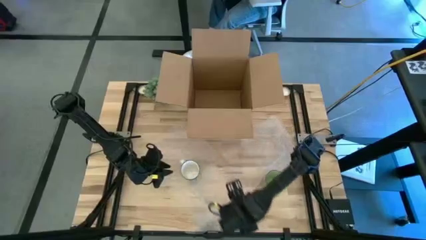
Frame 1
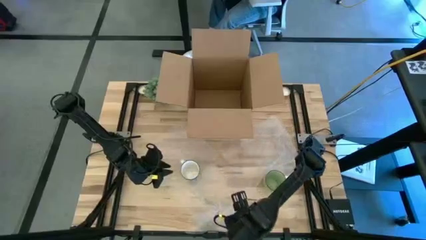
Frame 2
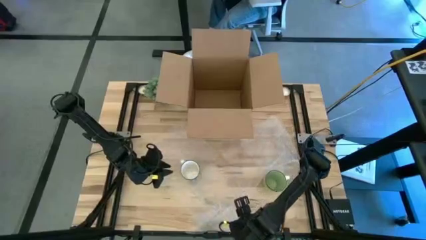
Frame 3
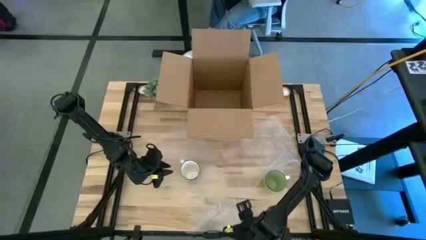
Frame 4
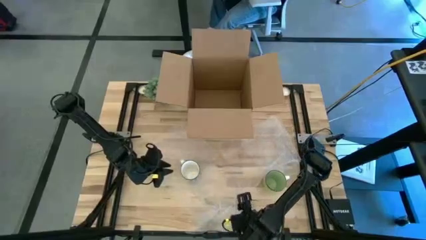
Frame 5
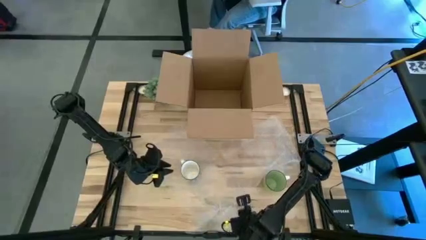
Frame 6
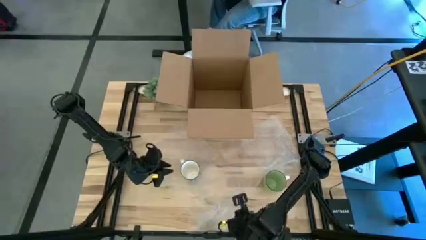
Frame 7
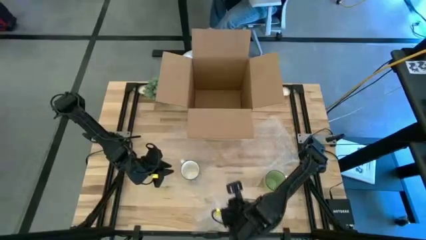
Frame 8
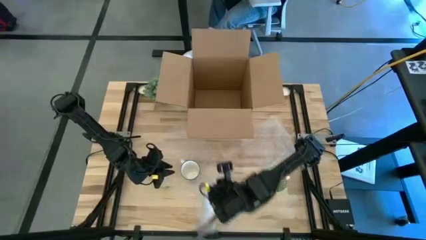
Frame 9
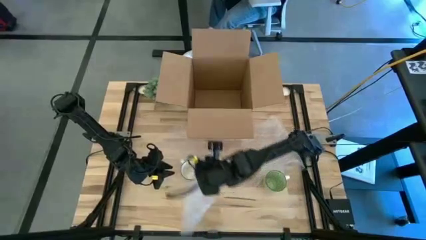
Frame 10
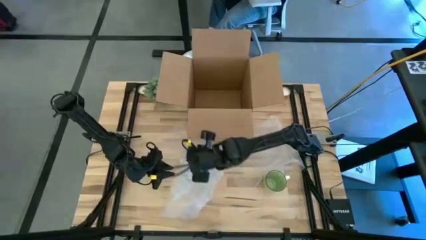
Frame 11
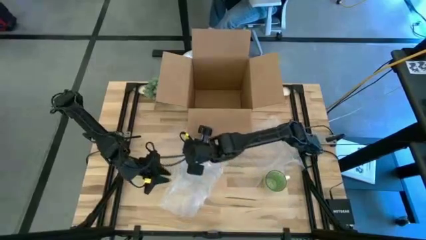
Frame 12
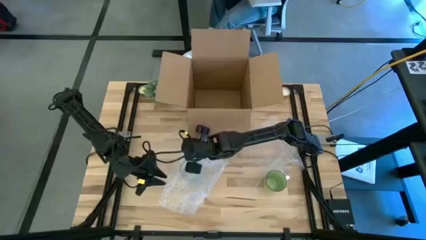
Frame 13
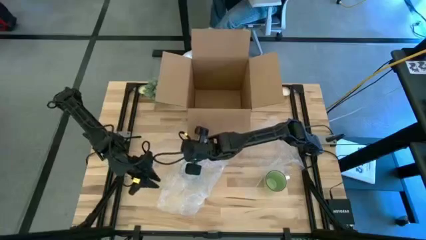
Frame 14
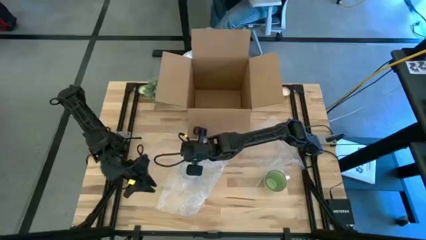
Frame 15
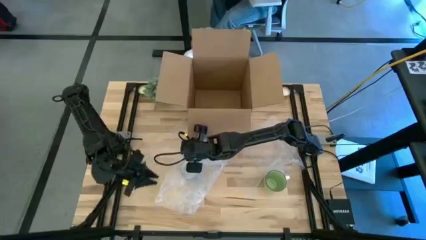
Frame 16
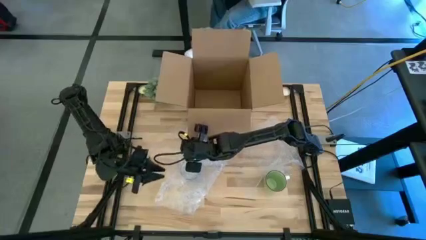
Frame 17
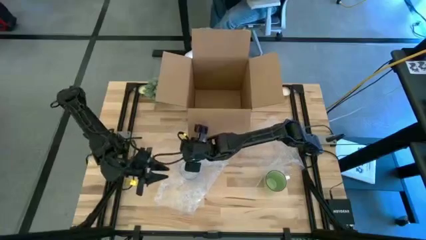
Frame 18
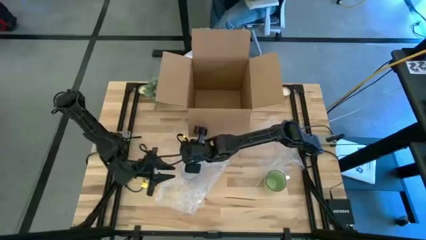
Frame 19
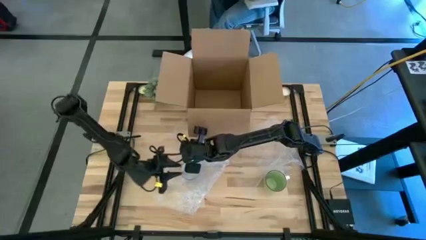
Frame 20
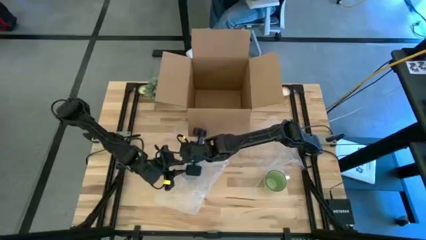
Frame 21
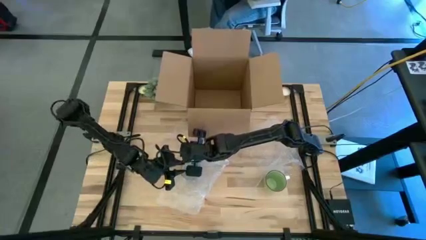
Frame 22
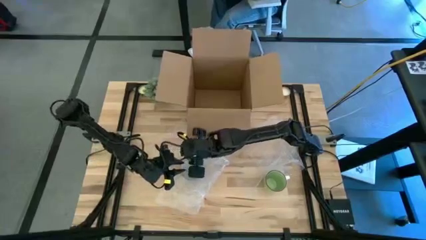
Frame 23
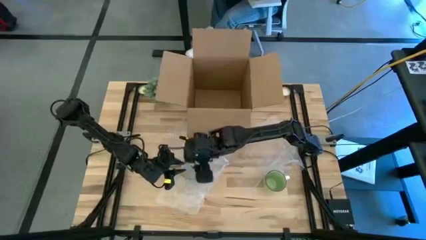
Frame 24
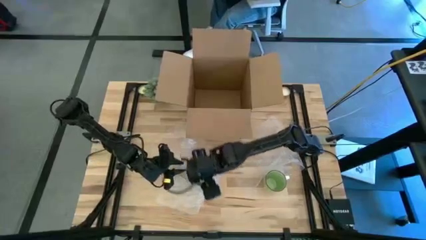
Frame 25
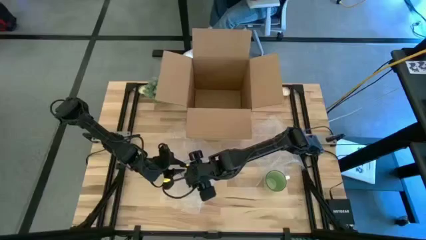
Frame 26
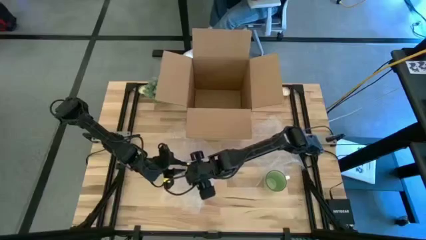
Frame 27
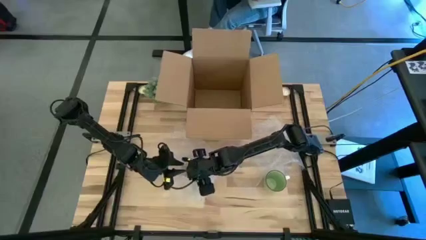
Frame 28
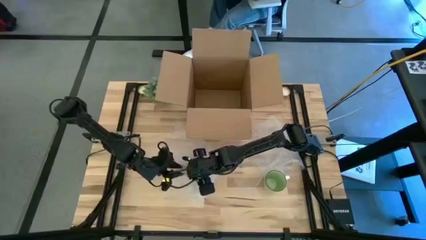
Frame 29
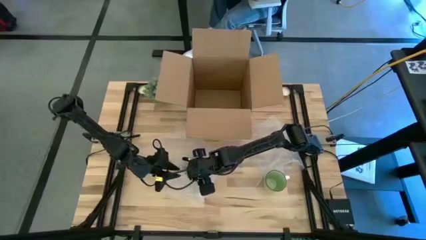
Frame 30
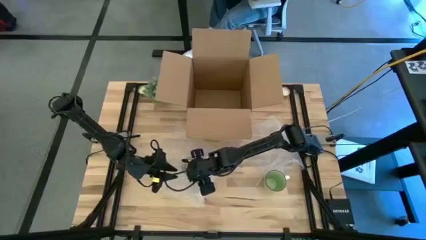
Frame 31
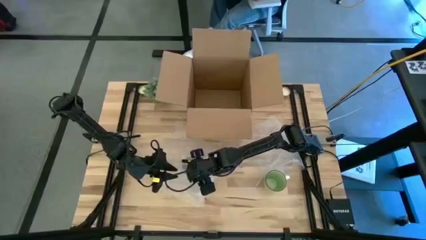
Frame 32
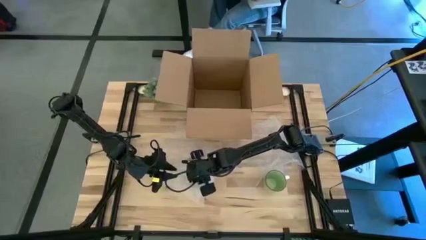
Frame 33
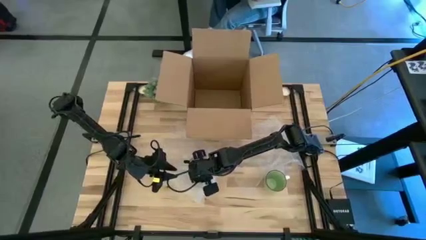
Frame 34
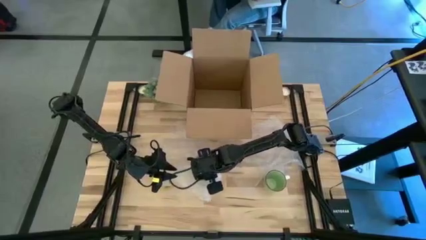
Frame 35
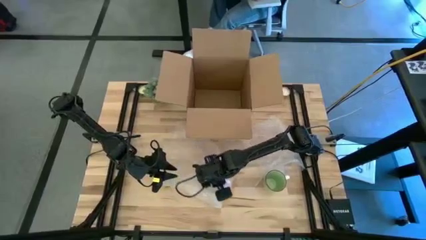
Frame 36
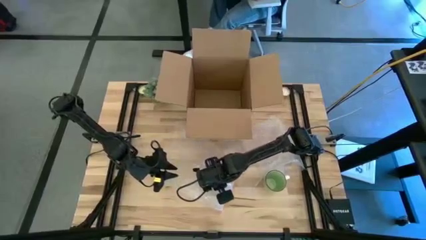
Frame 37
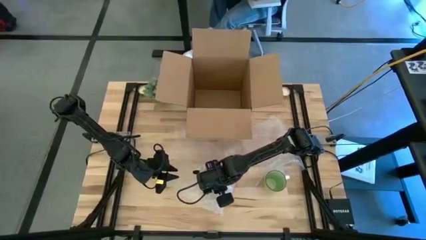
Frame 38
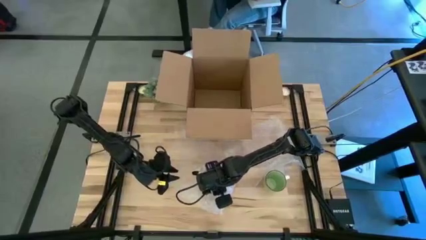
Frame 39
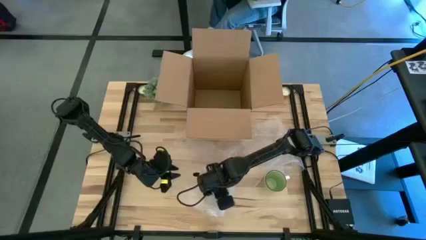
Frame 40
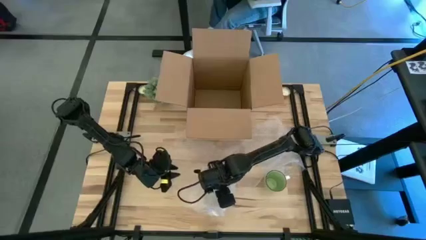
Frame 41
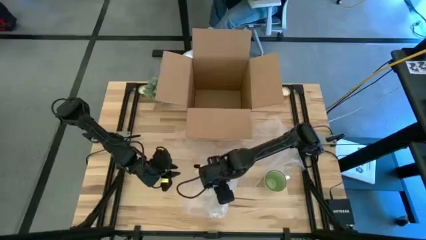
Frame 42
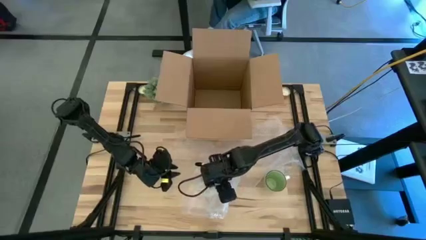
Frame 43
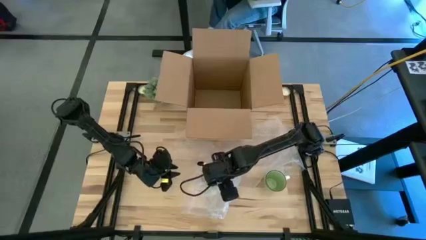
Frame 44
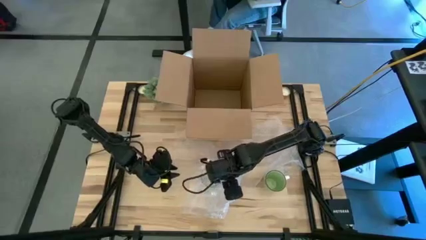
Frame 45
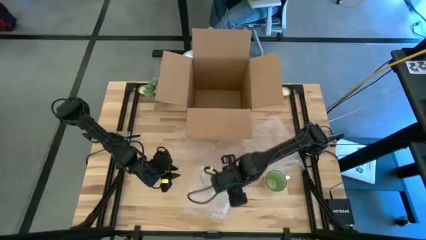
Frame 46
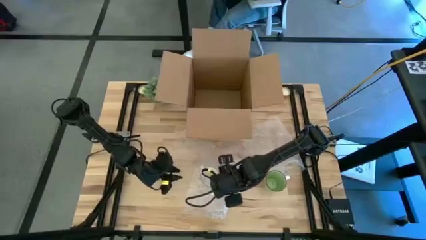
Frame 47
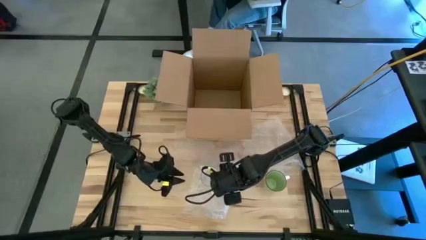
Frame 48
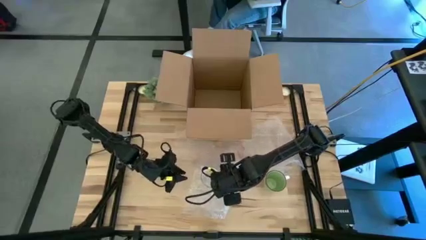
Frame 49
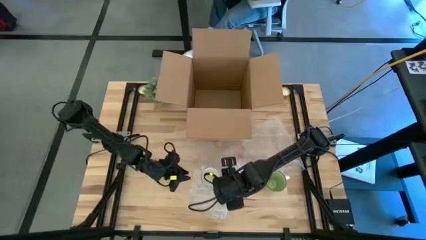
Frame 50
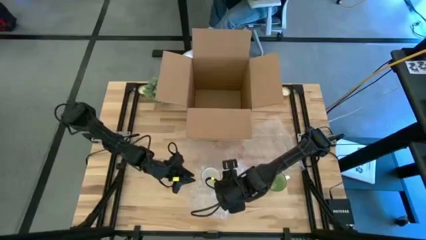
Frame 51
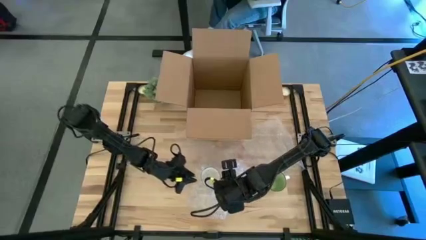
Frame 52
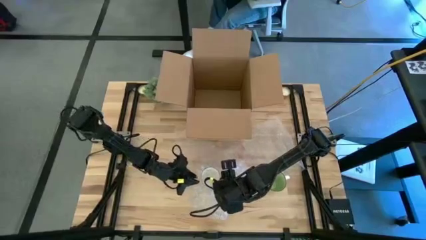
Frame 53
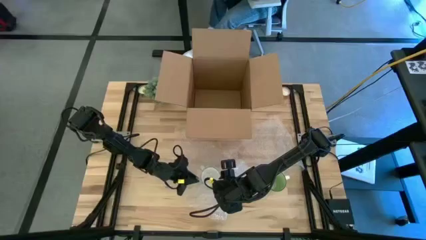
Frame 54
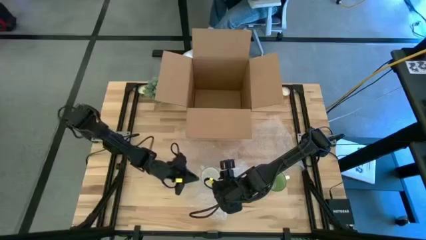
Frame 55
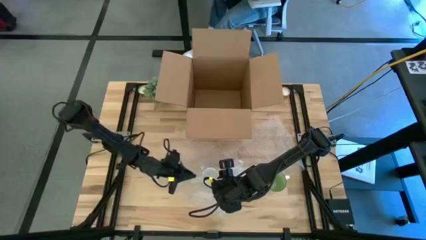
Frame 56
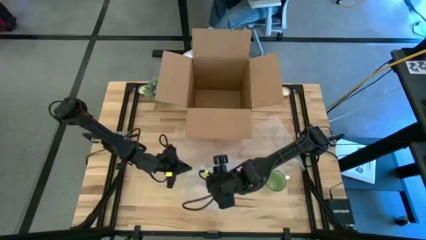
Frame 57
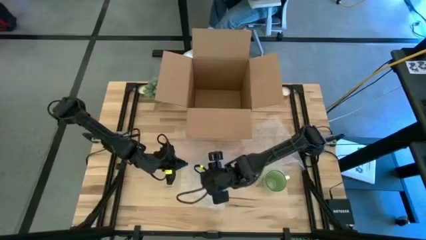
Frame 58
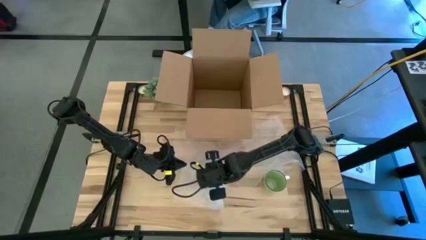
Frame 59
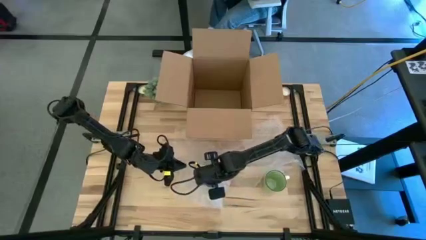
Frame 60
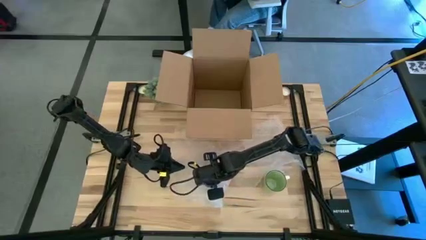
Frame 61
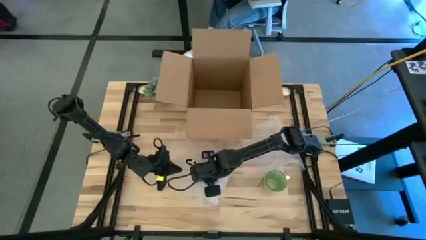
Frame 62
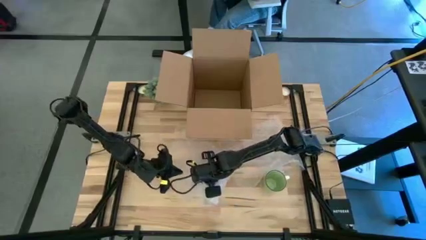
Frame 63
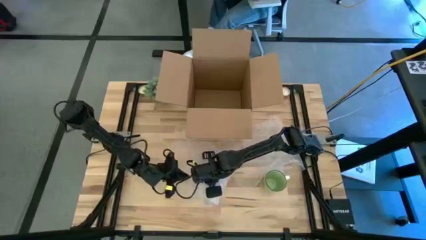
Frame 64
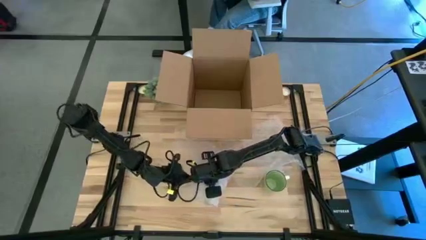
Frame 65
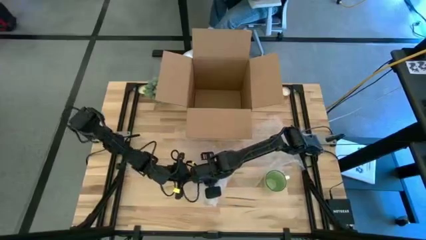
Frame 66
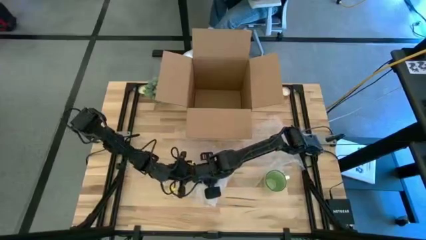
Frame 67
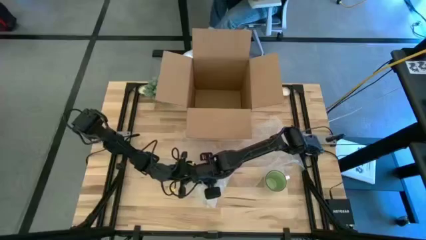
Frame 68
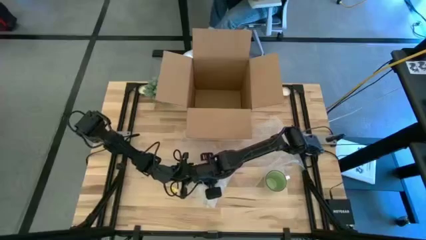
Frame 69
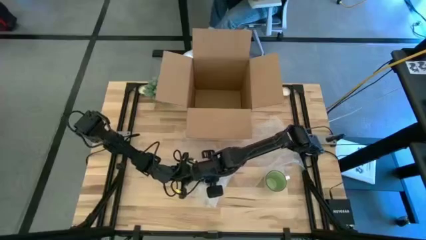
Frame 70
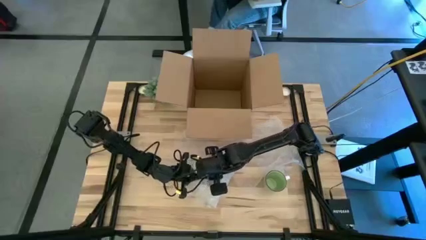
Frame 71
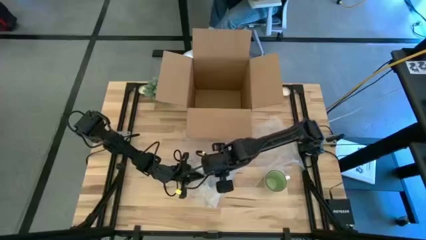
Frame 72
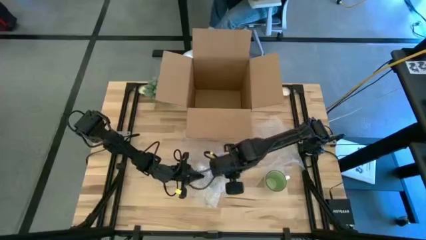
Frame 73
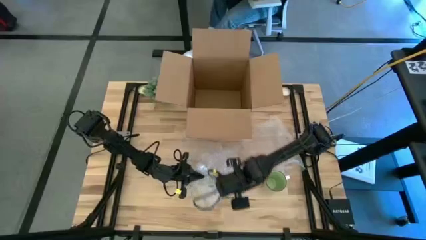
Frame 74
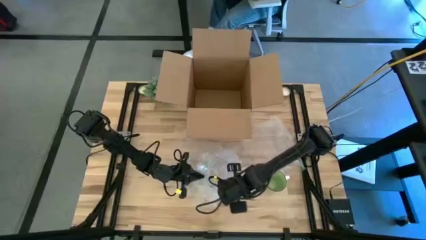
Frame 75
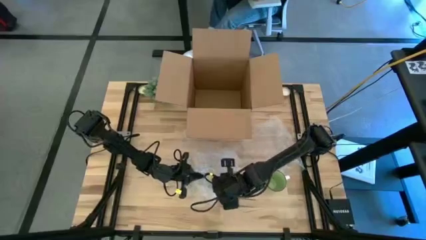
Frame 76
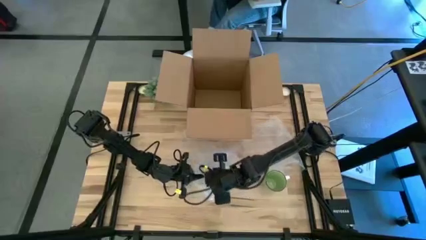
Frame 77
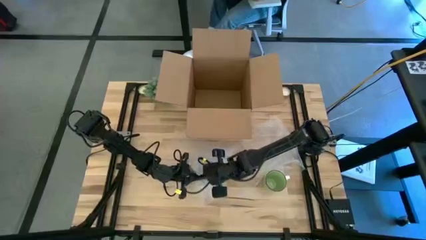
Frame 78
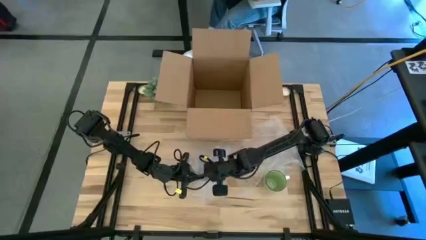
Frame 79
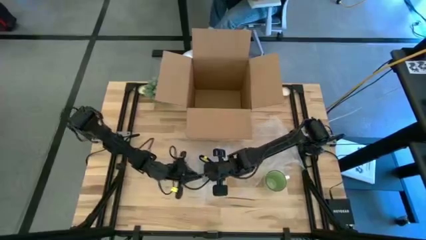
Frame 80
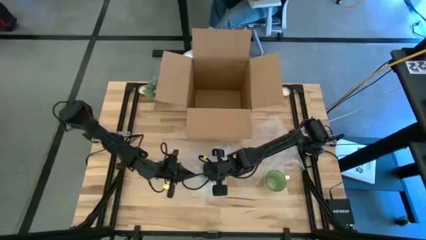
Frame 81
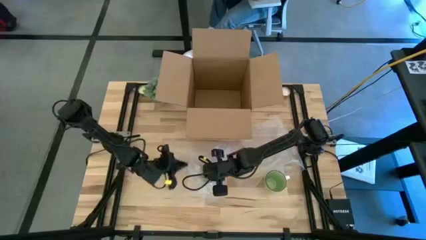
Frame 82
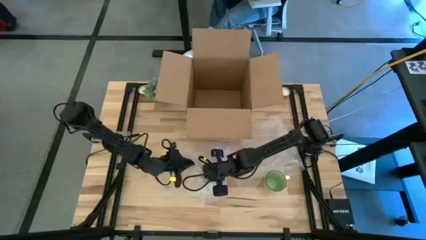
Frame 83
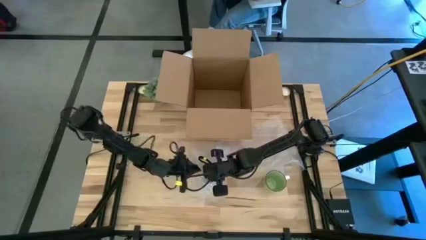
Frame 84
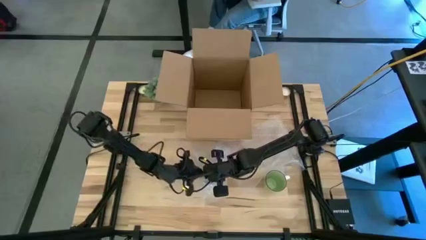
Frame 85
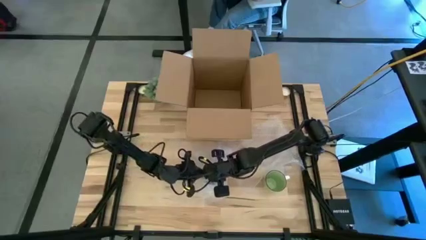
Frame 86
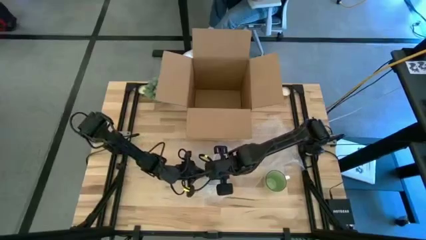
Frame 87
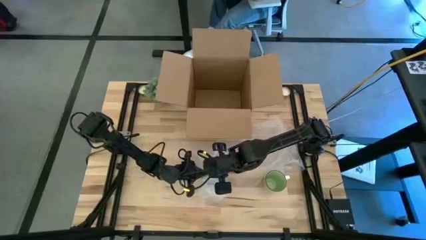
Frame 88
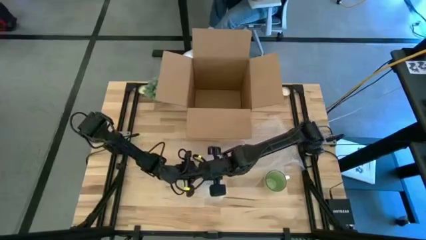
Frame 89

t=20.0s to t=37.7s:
Task: wrap mug
Wrap the white mug with bubble wrap
